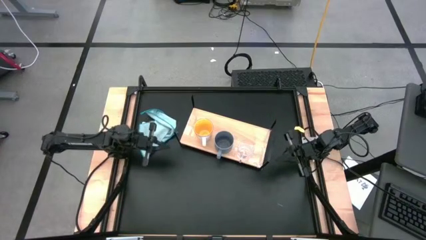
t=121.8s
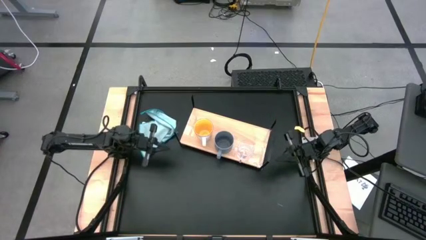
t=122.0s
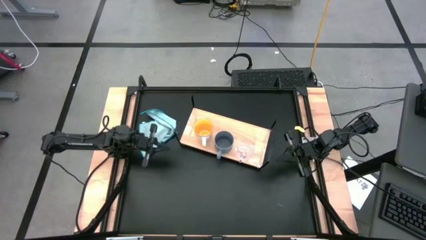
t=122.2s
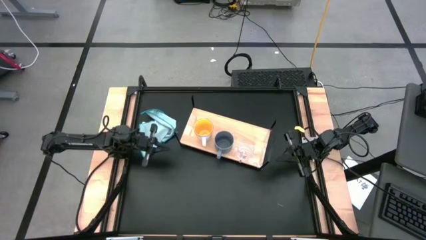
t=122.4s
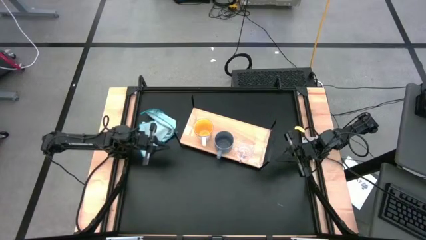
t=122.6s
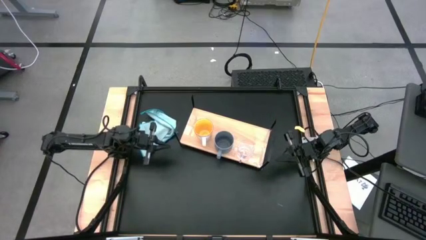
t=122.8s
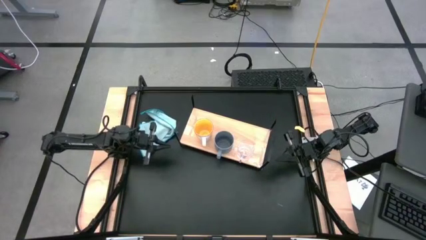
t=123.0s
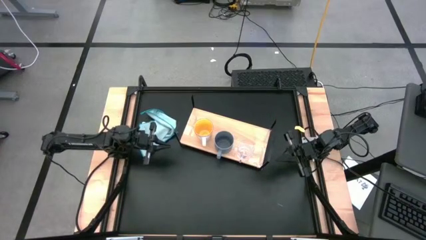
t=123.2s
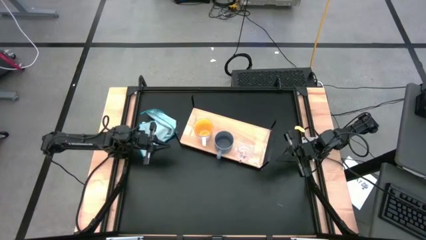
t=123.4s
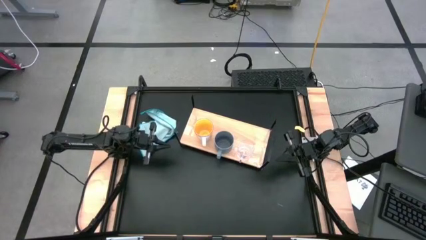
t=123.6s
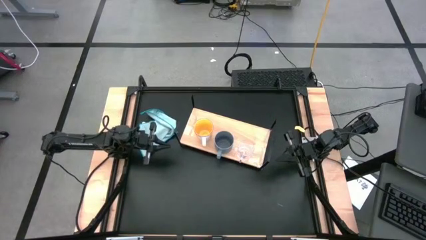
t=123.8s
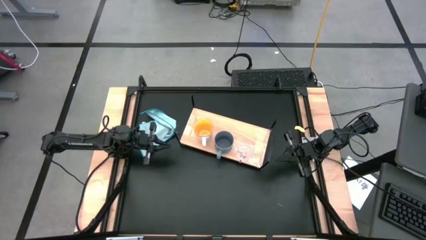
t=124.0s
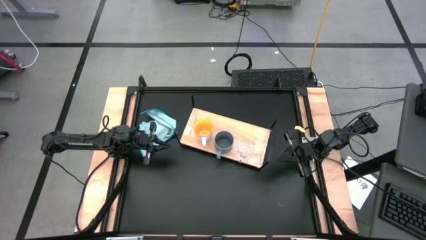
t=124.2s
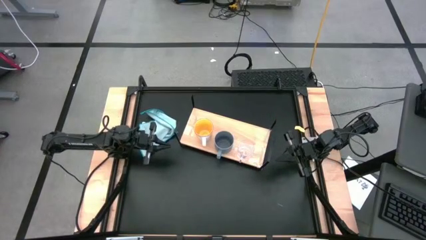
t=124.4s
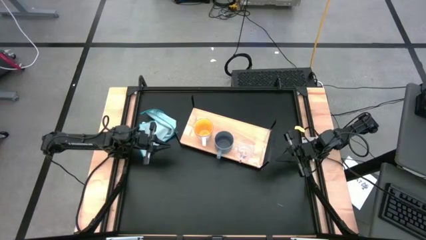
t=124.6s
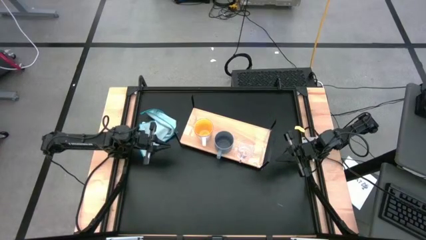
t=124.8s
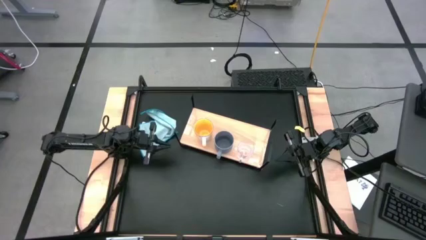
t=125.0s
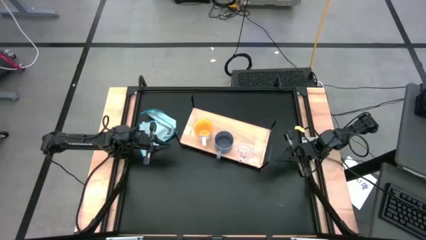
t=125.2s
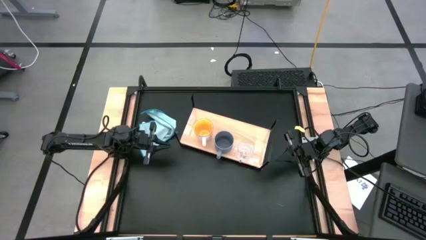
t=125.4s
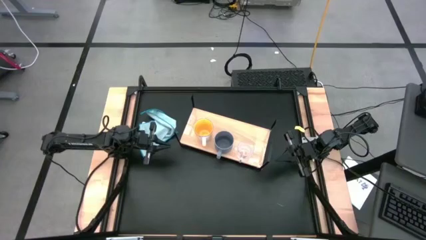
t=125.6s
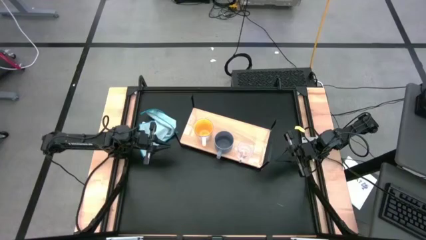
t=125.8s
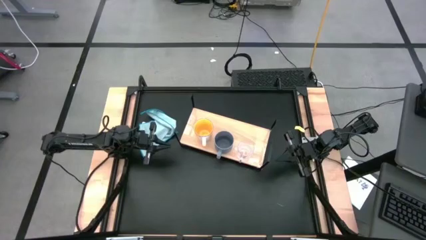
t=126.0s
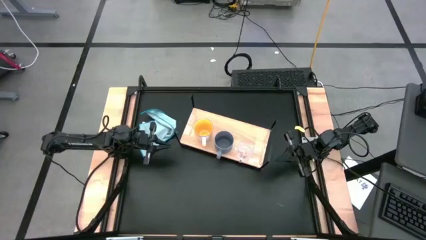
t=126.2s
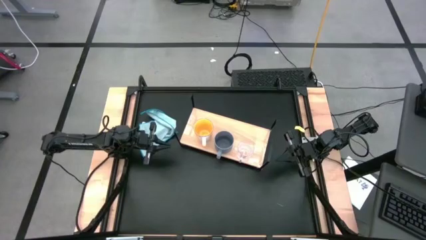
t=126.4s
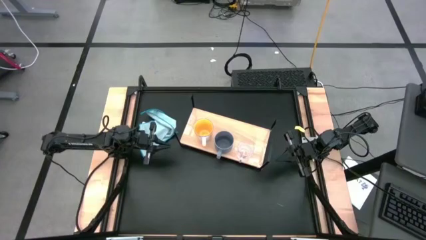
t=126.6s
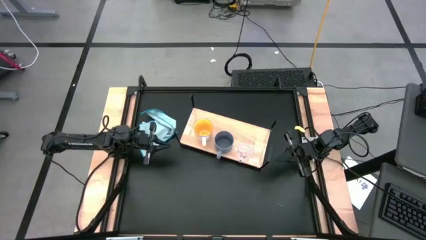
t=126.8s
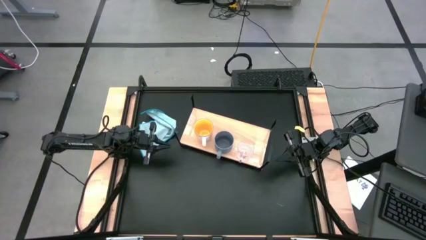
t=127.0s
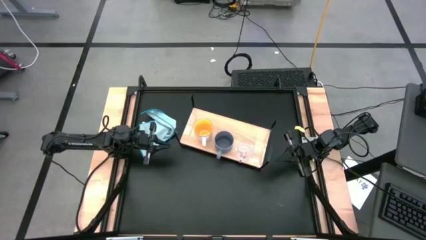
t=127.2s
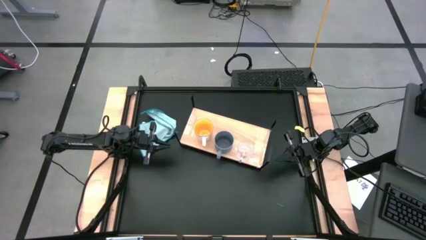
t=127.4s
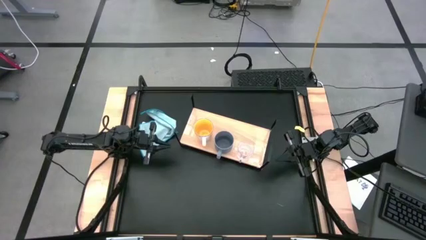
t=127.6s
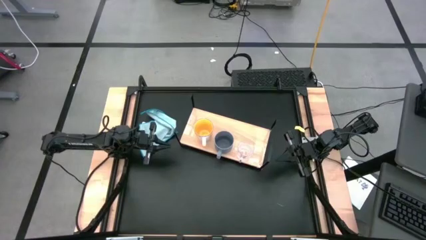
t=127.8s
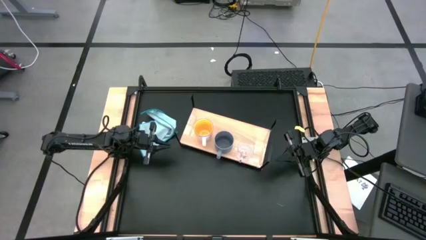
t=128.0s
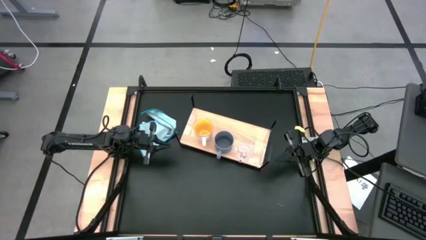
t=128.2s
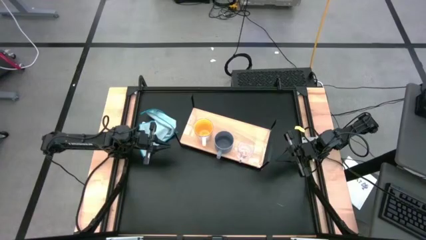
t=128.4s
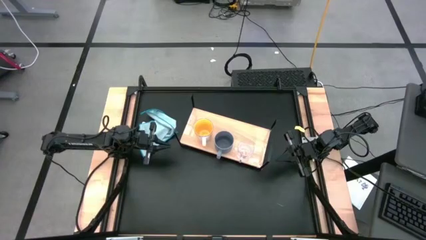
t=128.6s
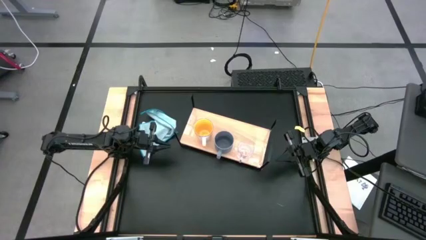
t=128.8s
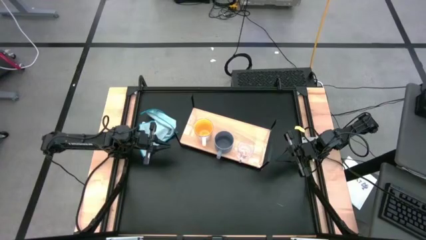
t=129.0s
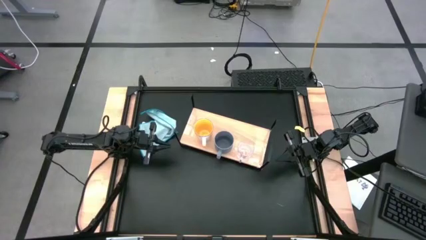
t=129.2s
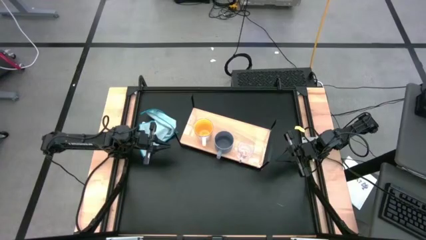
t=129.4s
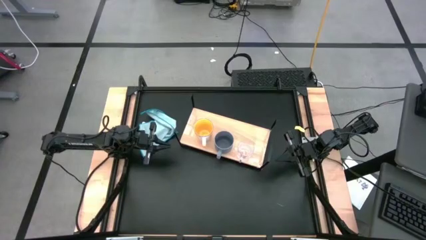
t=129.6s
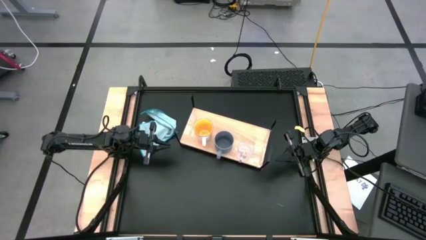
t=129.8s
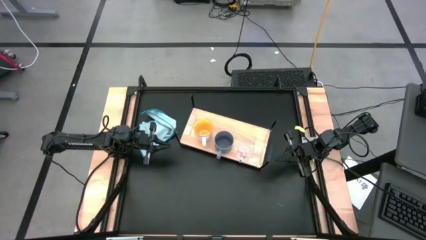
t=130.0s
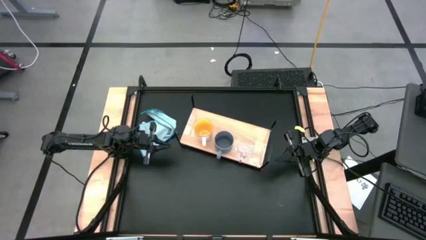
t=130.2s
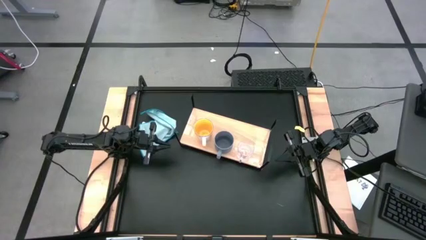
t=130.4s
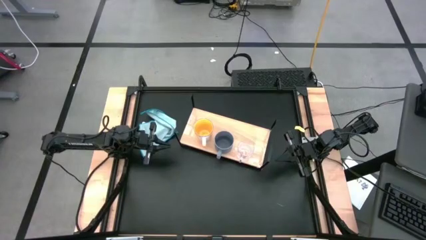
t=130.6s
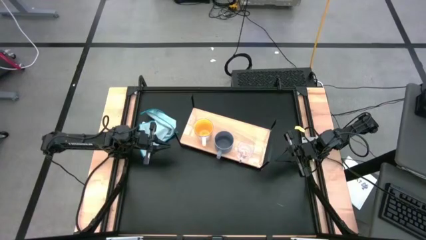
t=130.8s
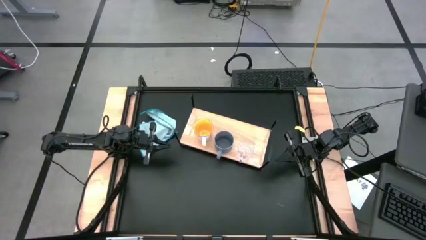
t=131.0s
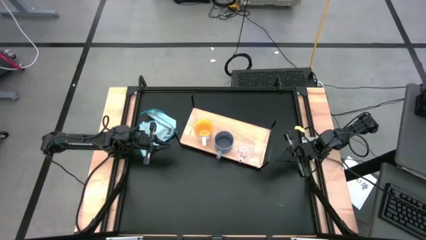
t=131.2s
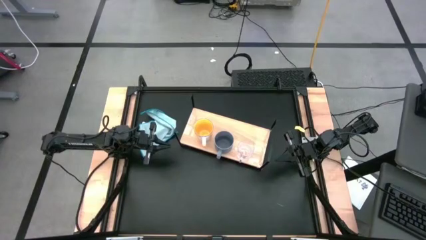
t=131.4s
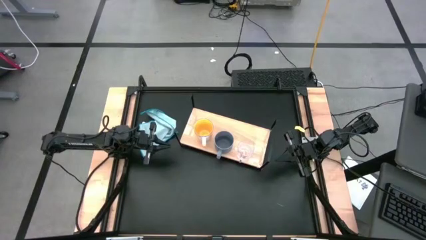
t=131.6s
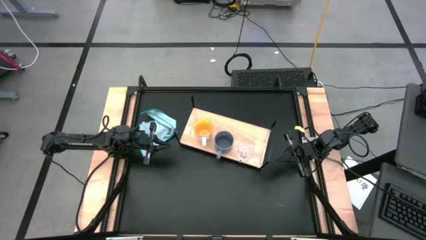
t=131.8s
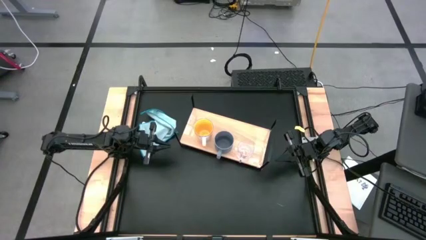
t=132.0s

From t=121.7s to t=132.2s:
Task: Stack small to large cups/mugs on shelf
Return to home position

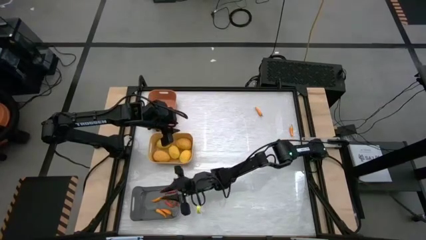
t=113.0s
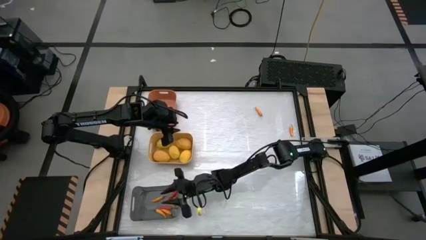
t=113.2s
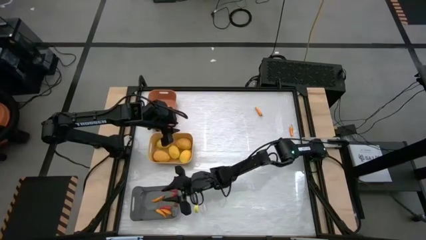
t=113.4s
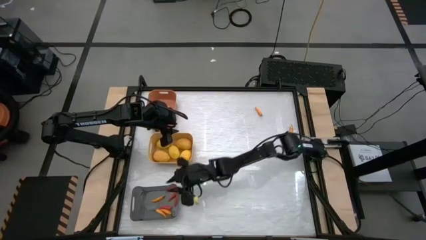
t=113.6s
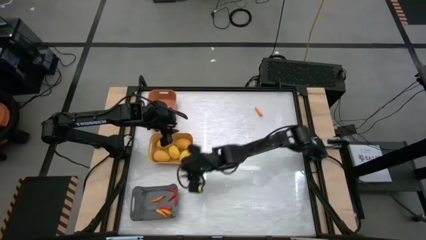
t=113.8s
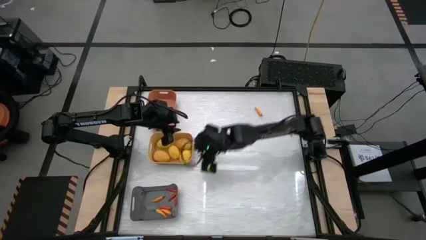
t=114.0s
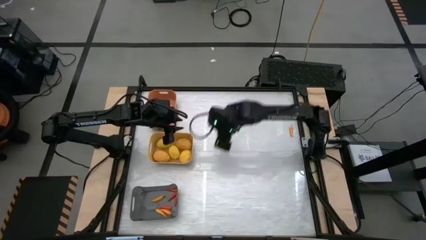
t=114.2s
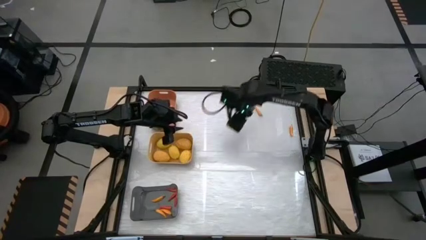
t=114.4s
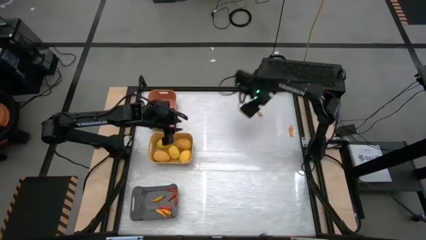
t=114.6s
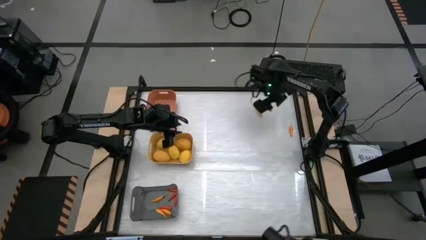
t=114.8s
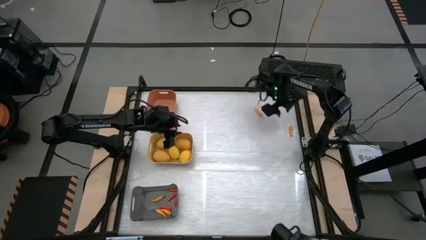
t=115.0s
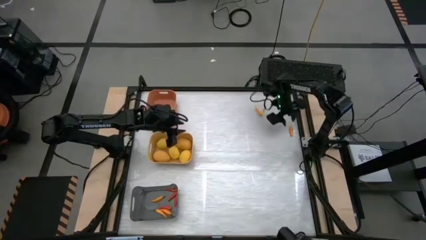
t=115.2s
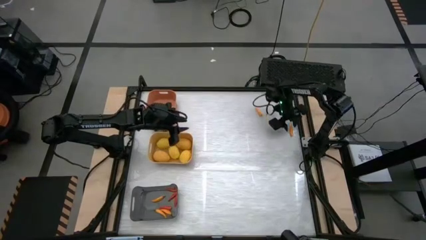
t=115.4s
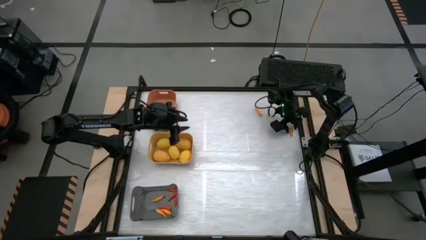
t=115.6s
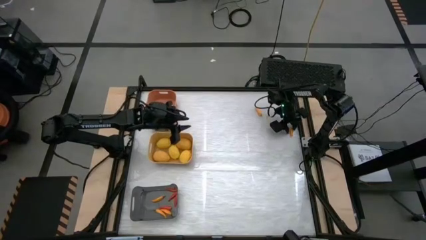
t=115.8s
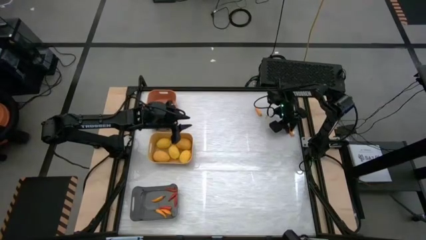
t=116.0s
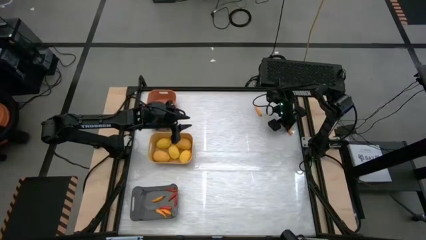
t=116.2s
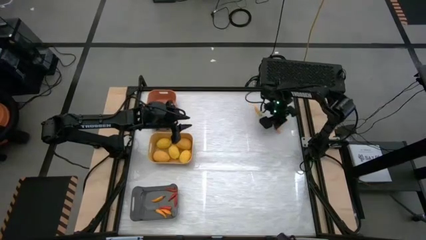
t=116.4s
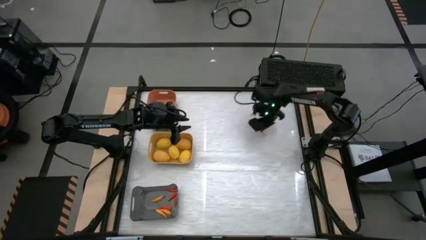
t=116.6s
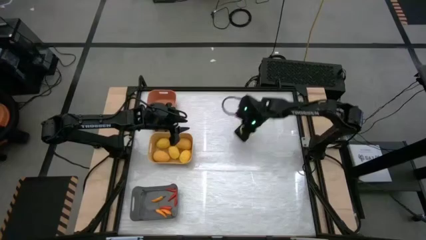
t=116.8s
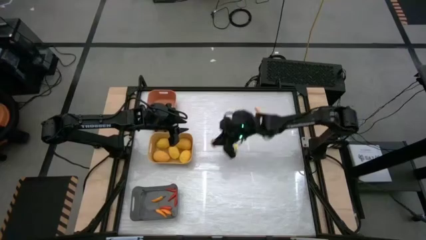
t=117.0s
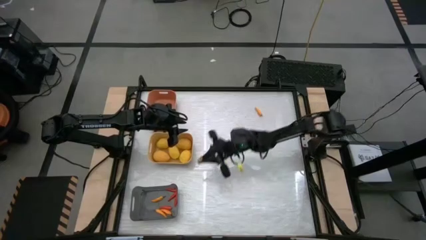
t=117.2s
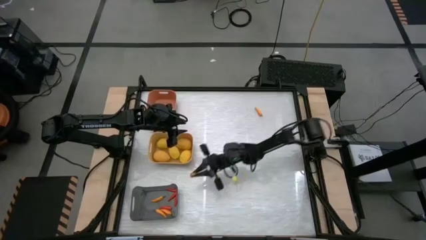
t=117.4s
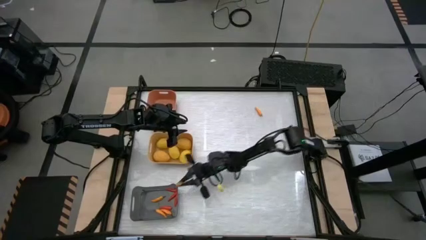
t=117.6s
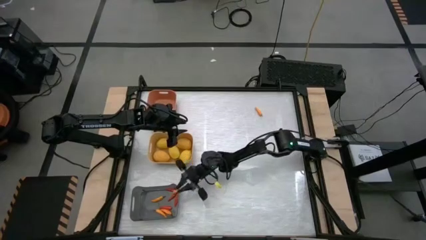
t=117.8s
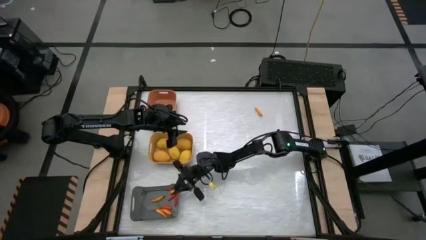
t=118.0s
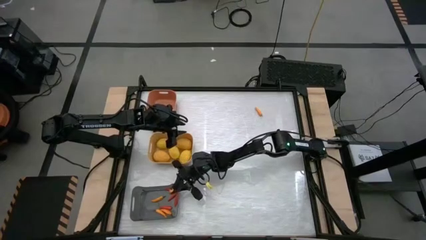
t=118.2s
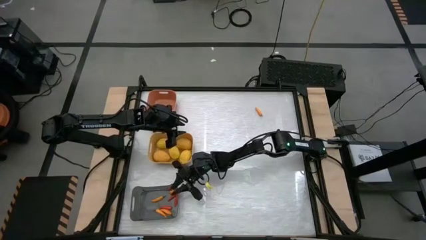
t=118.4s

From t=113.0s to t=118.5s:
Task: Sort produce into baskets
Put the yellow chili pepper into the gray bin
